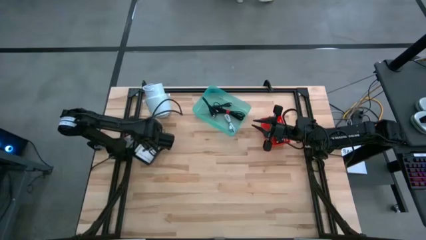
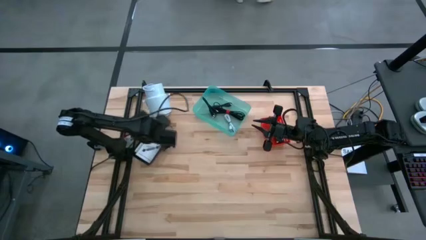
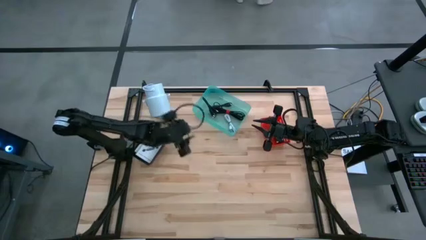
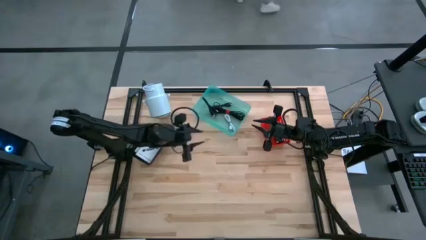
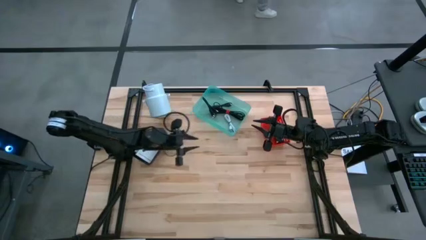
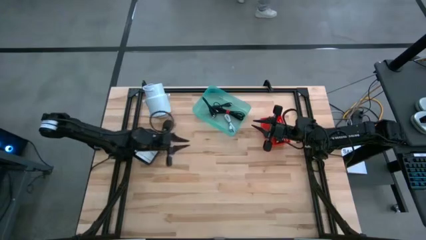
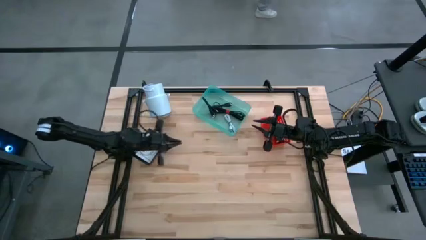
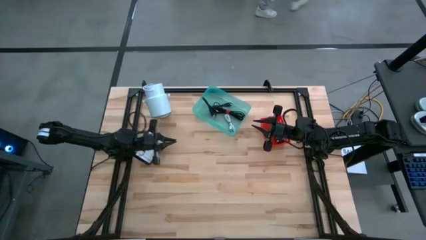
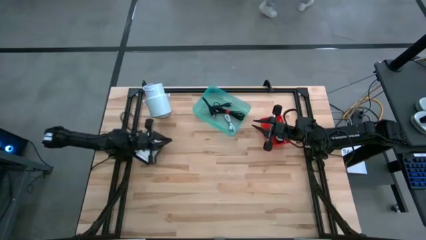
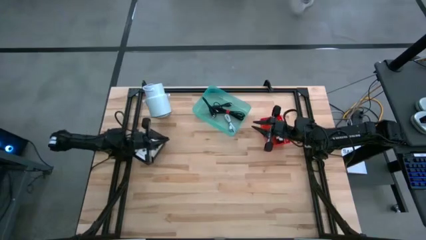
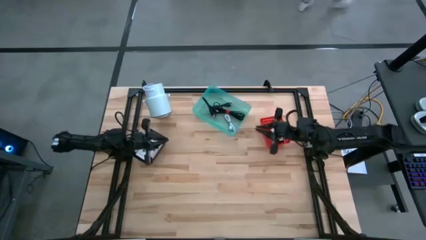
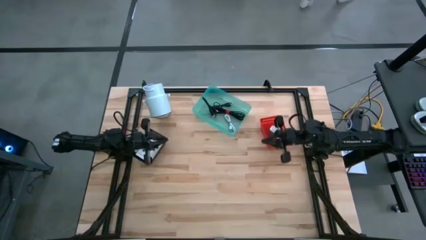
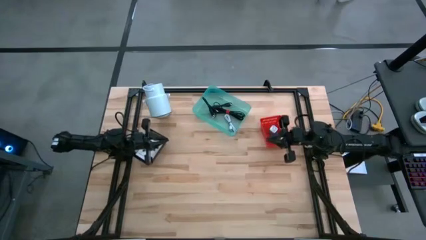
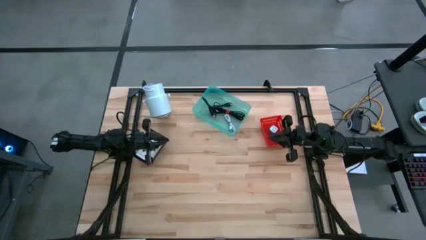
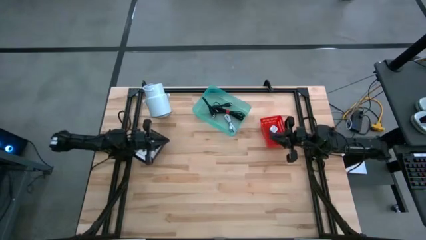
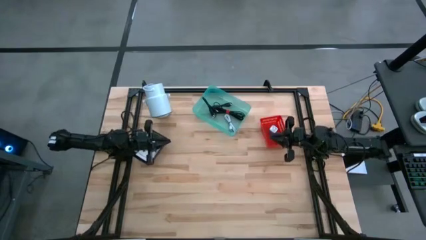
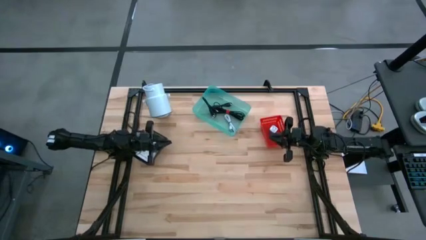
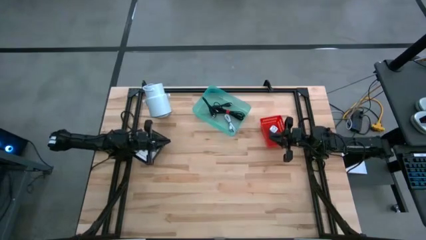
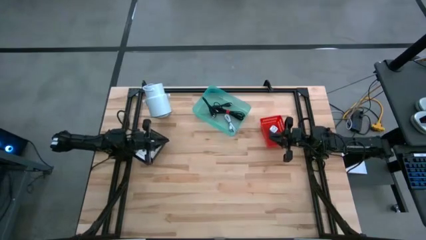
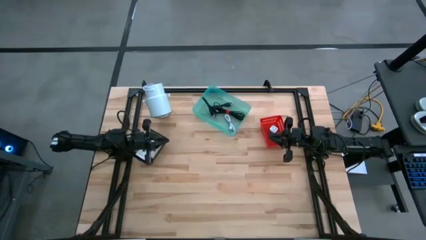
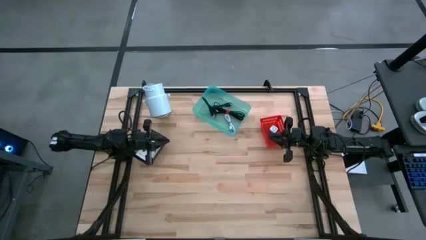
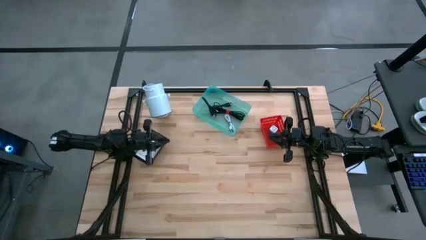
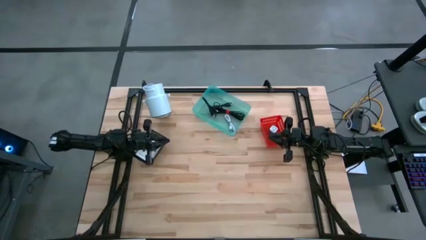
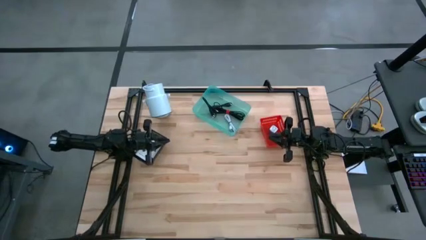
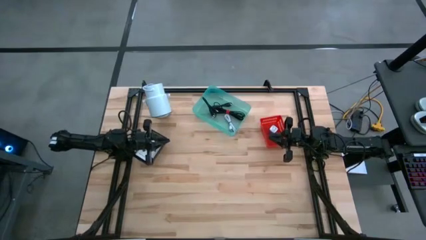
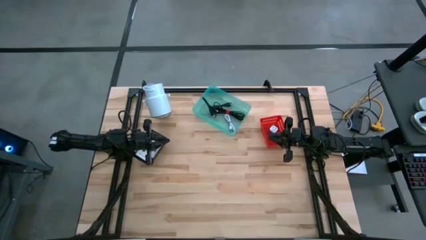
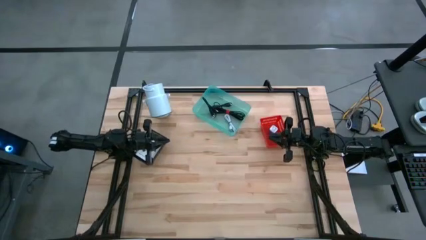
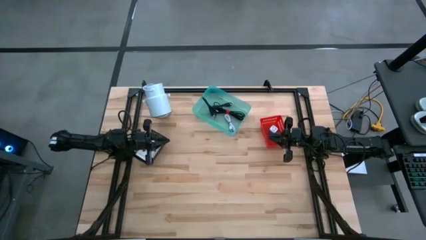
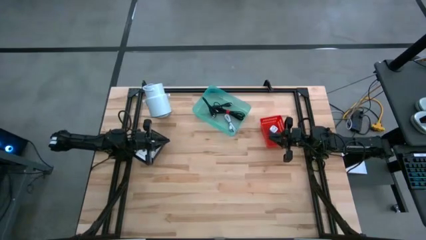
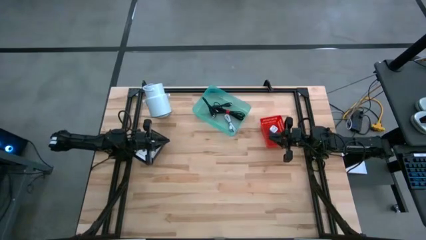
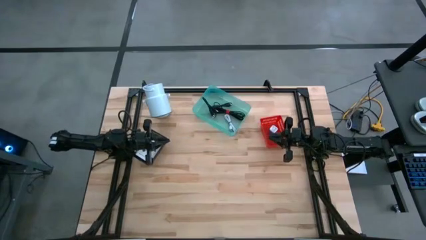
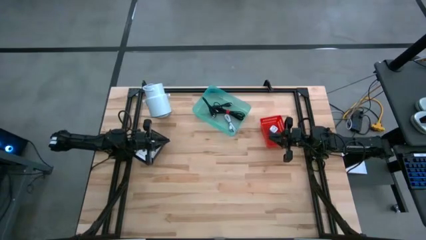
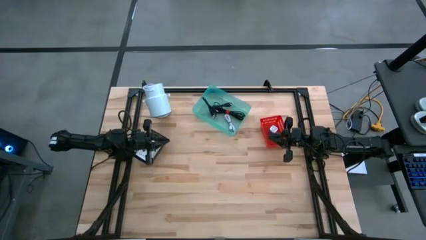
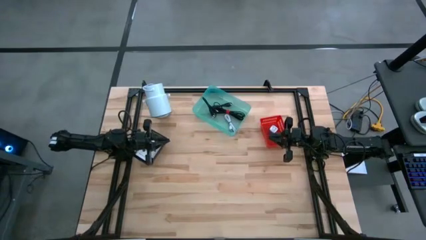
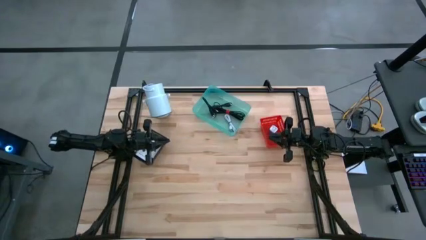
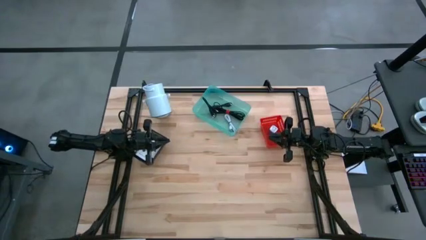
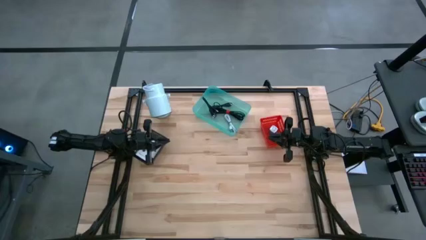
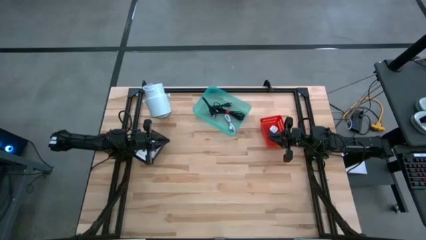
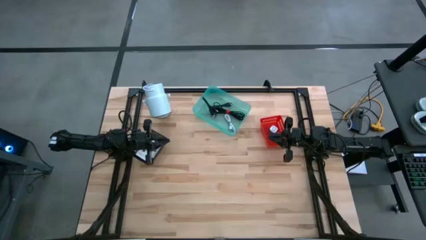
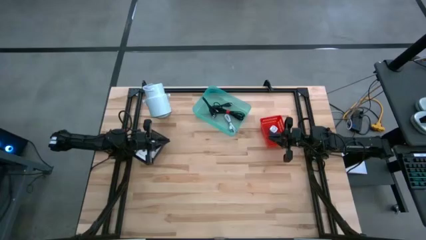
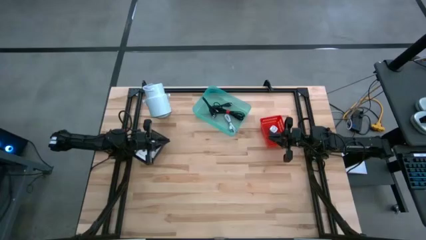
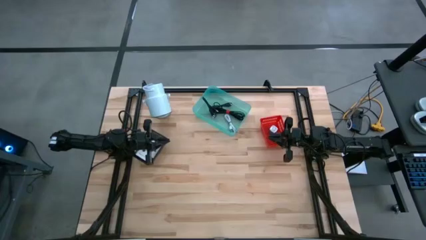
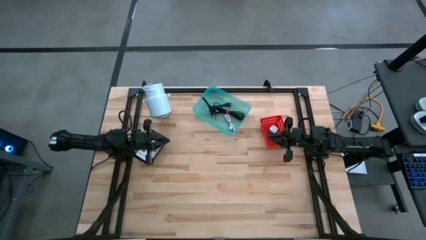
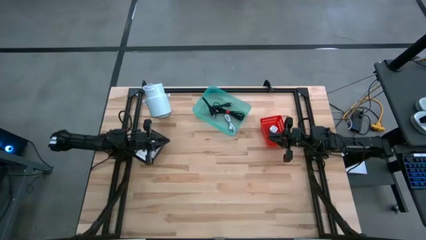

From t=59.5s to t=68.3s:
Task: Pick and place items into bin
Return to Home Position

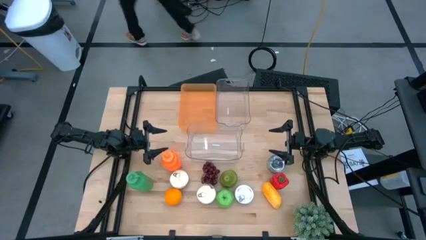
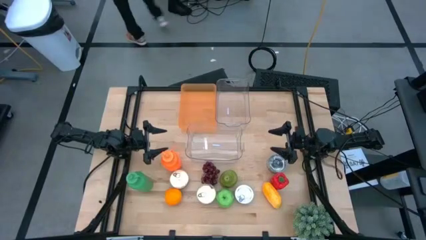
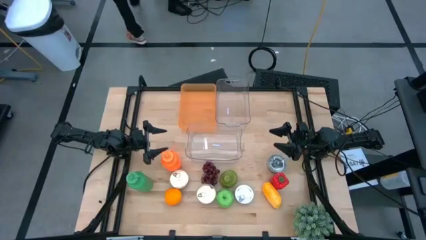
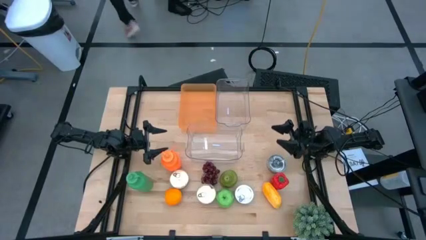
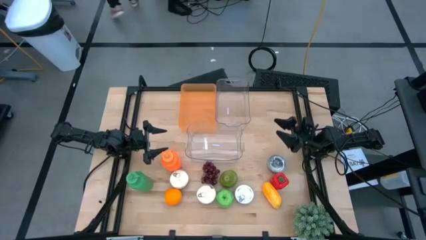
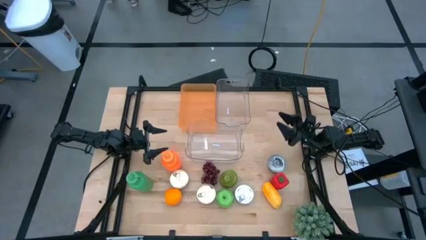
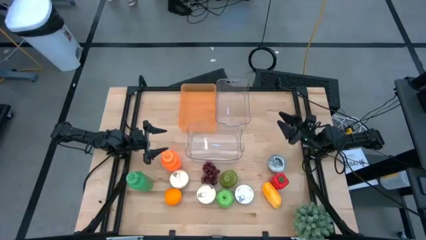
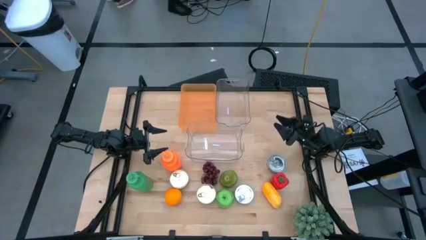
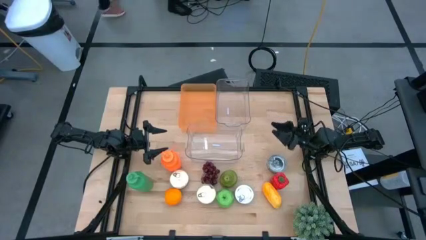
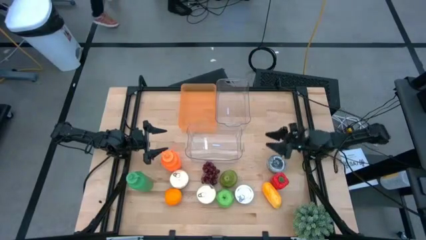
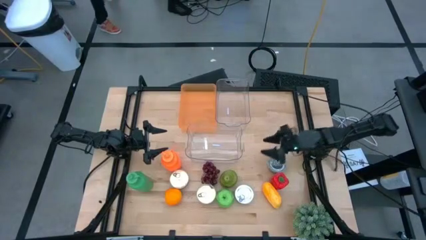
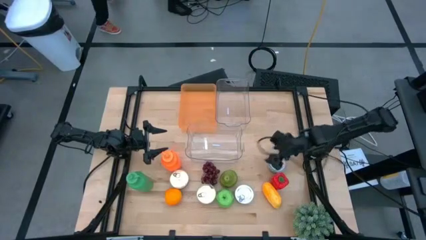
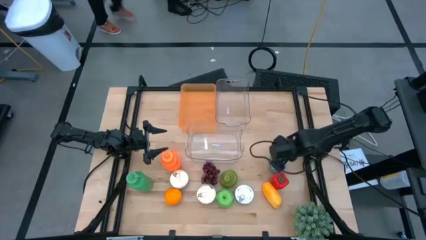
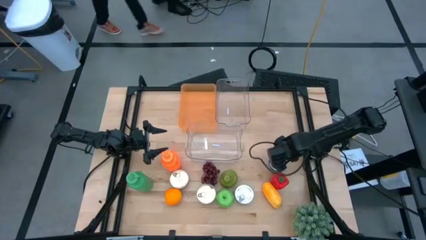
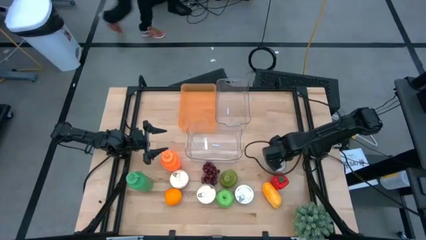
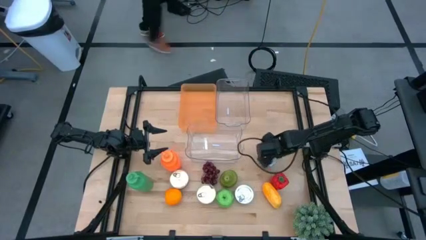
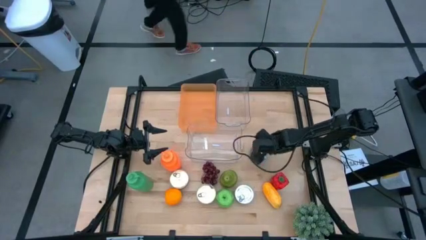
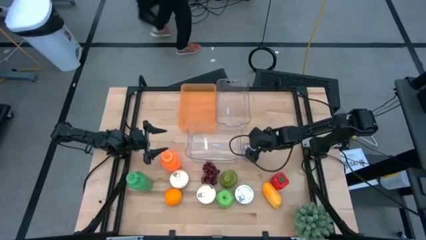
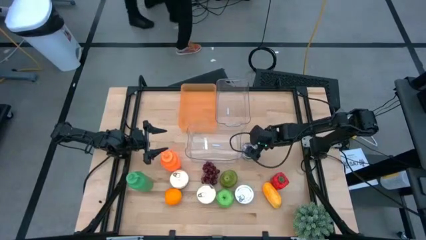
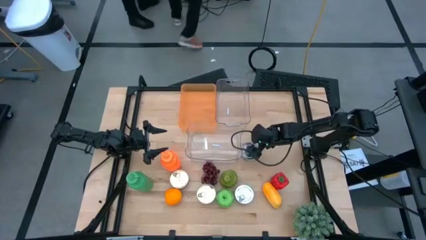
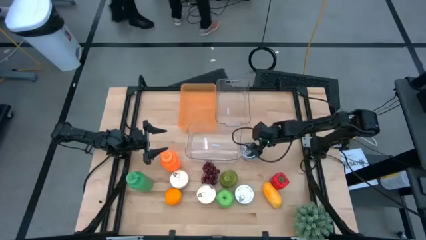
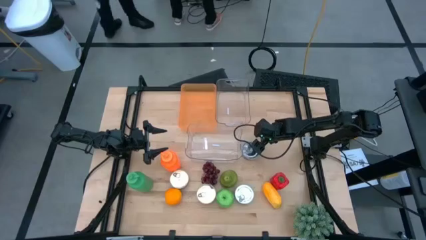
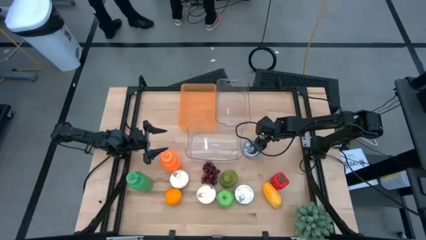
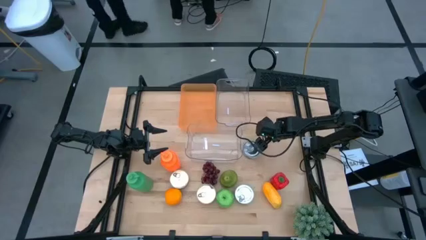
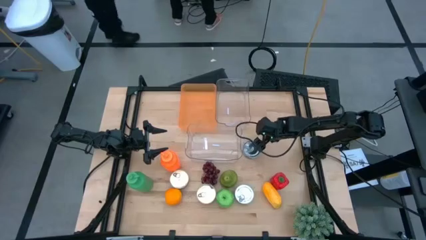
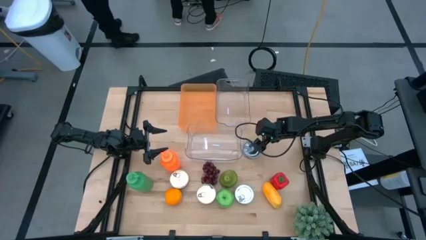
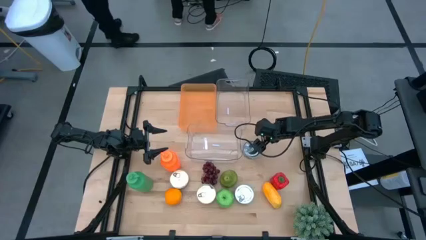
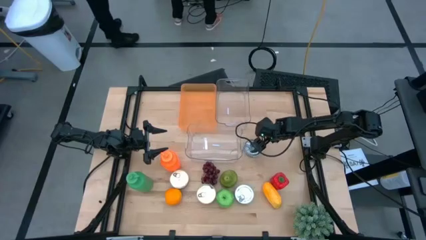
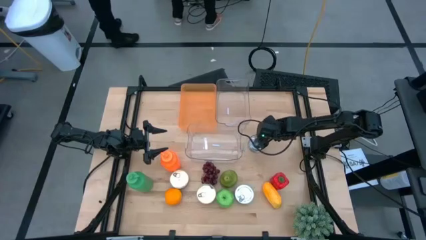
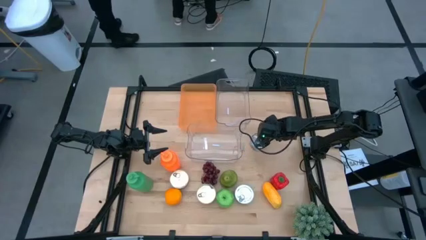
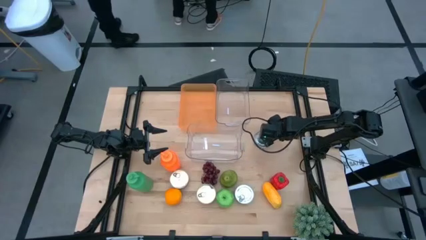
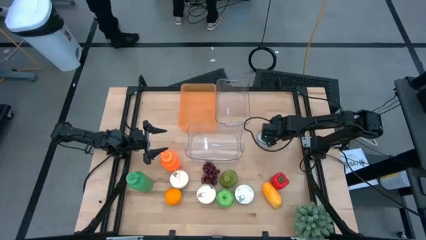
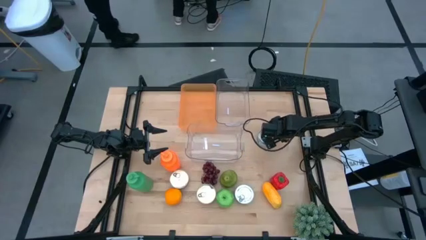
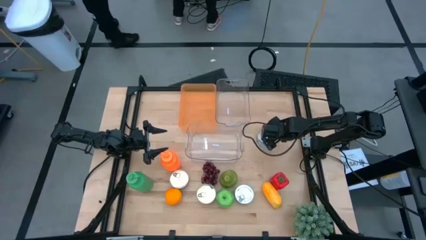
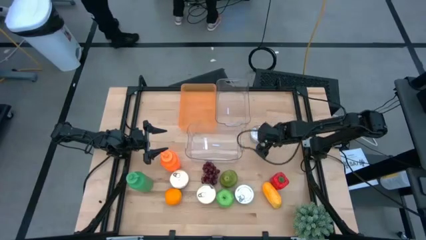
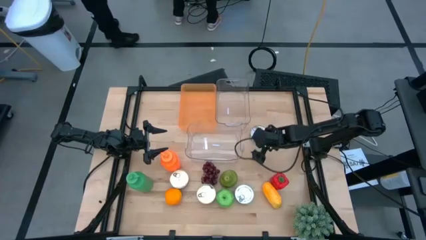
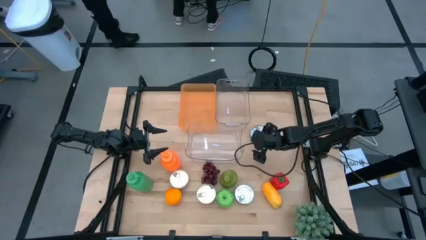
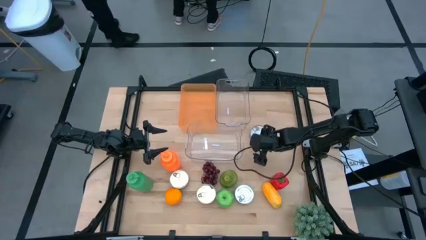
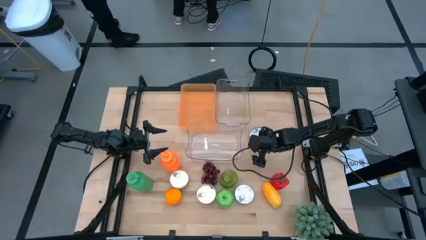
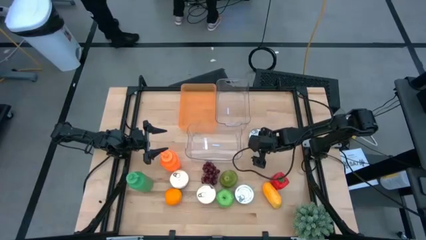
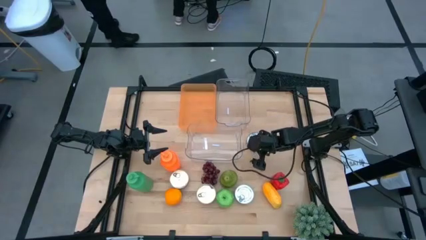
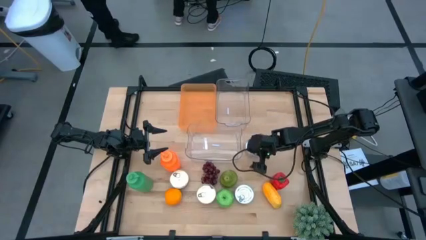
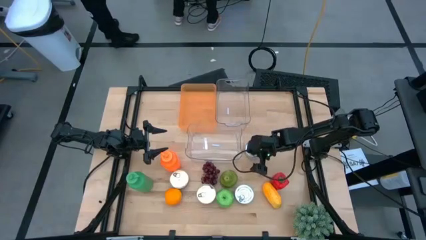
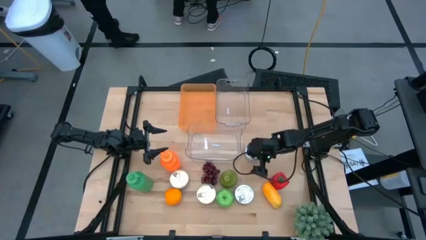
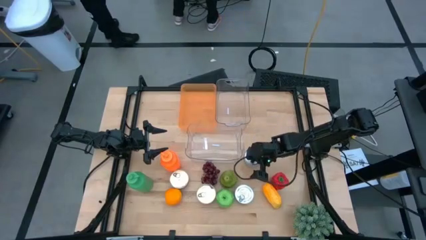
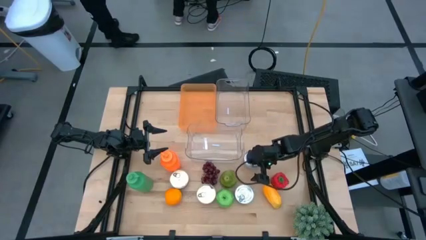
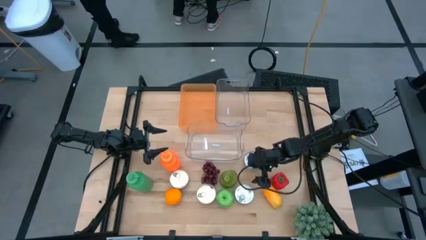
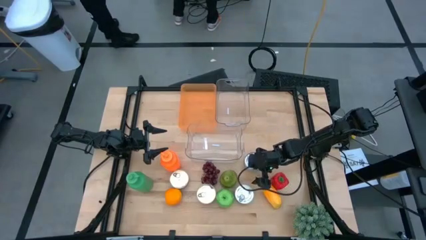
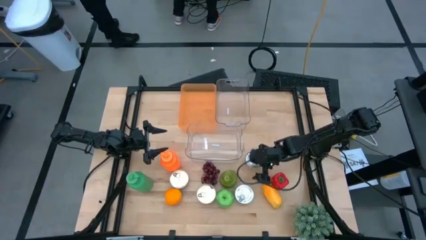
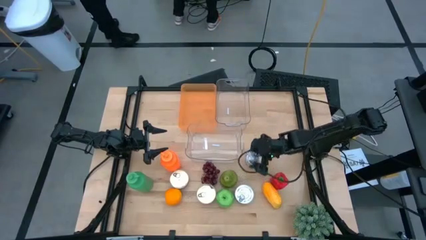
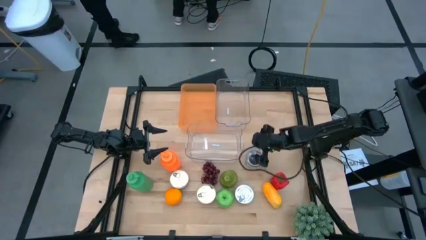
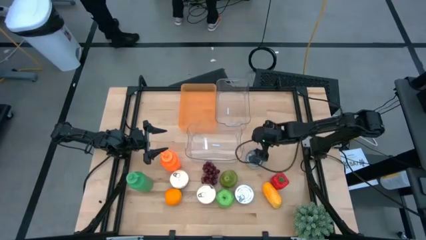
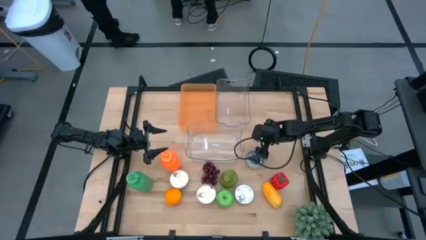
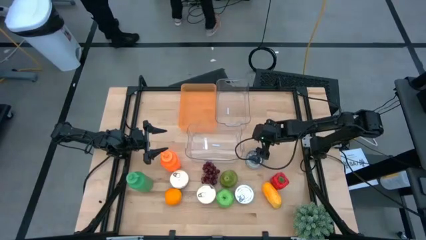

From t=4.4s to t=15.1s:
Task: Pick & Place Food Item
Put the top green tuna can into the bottom transparent bin
